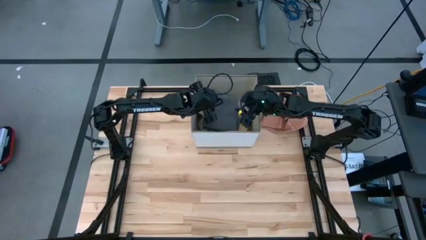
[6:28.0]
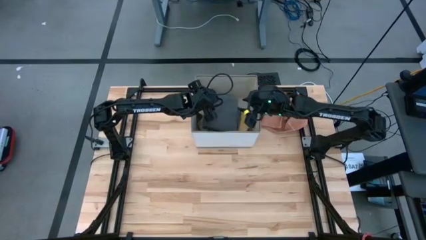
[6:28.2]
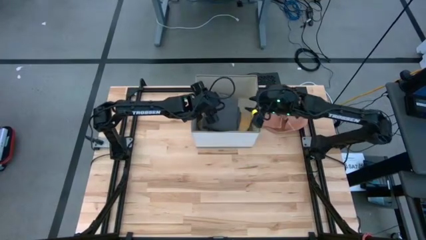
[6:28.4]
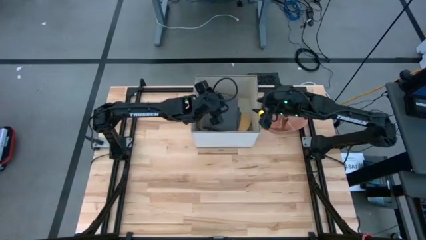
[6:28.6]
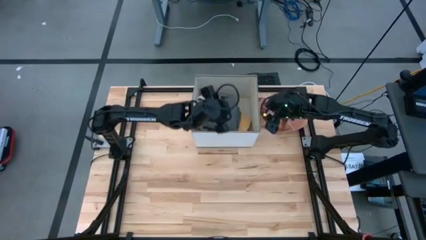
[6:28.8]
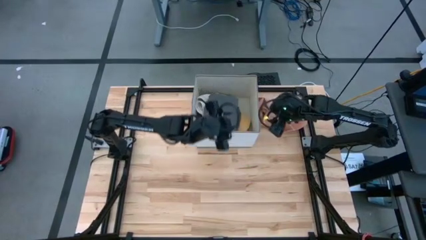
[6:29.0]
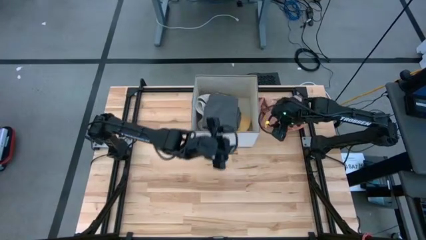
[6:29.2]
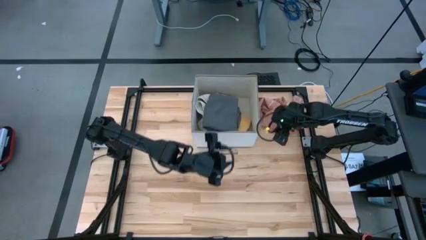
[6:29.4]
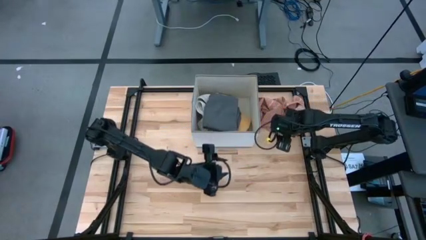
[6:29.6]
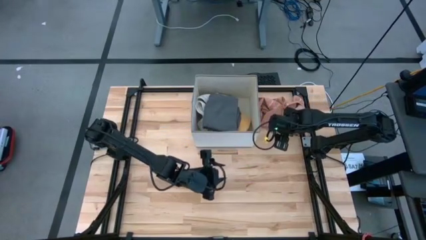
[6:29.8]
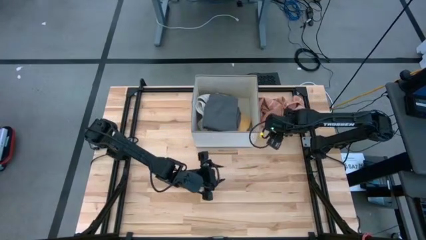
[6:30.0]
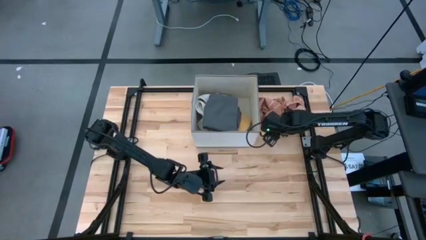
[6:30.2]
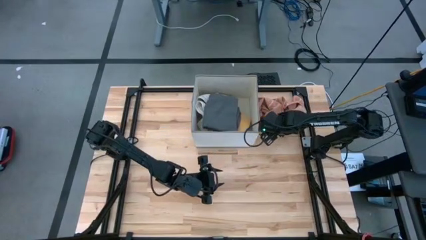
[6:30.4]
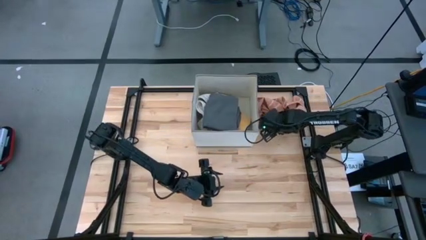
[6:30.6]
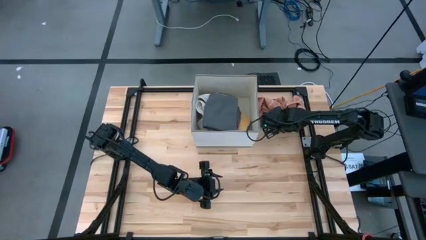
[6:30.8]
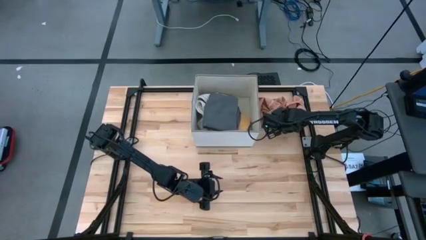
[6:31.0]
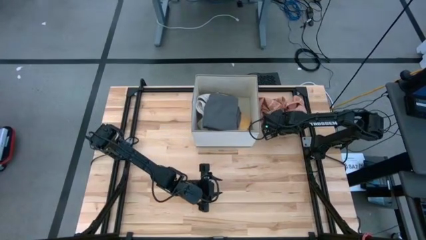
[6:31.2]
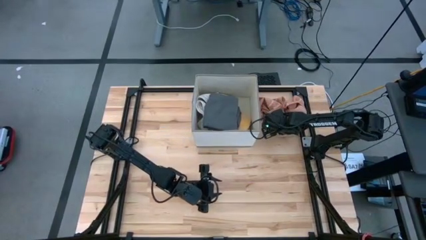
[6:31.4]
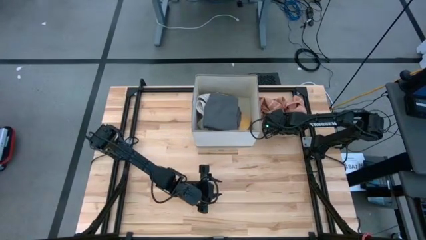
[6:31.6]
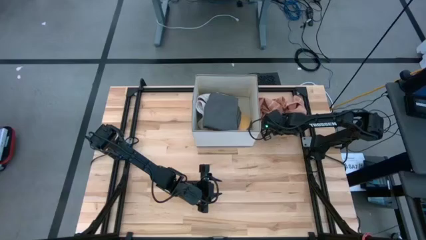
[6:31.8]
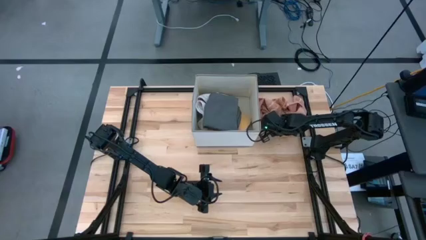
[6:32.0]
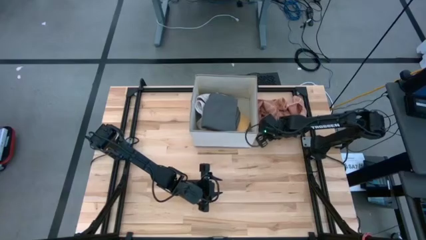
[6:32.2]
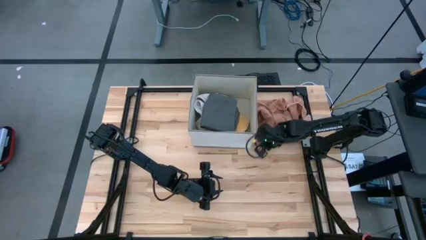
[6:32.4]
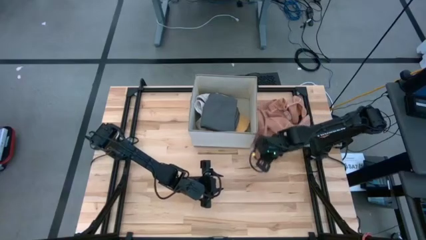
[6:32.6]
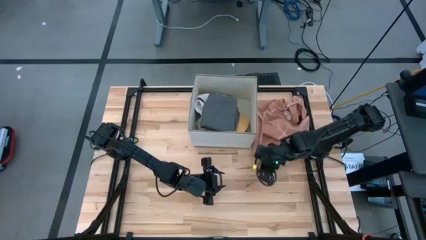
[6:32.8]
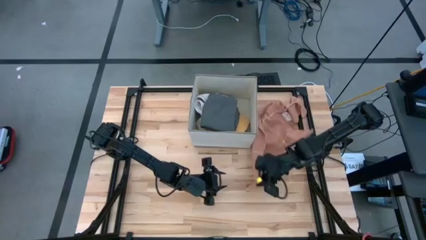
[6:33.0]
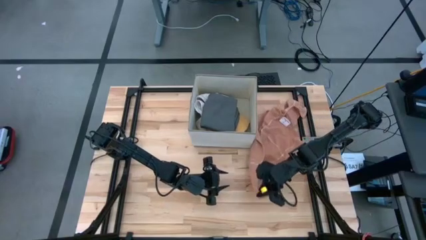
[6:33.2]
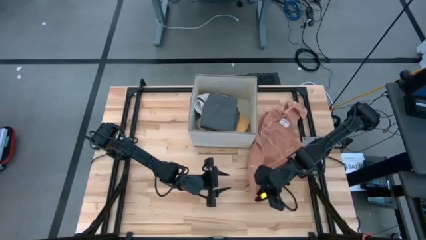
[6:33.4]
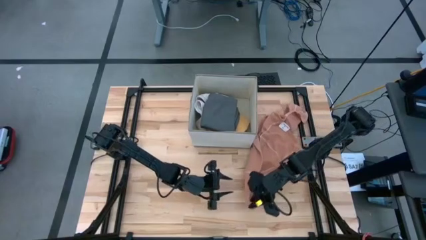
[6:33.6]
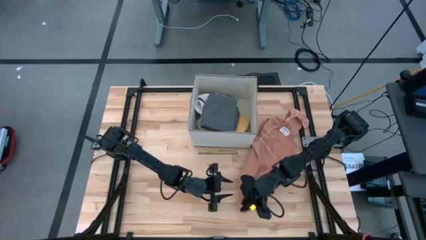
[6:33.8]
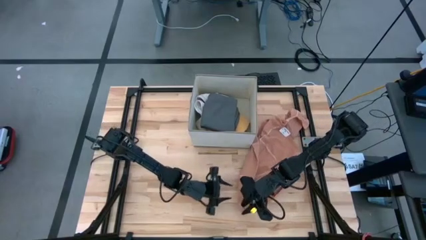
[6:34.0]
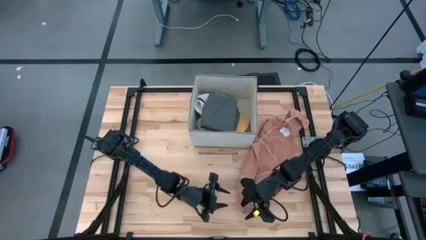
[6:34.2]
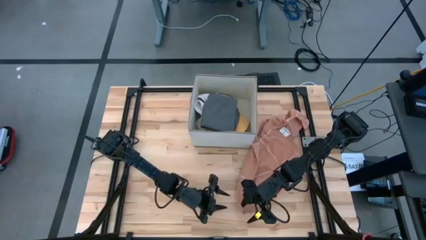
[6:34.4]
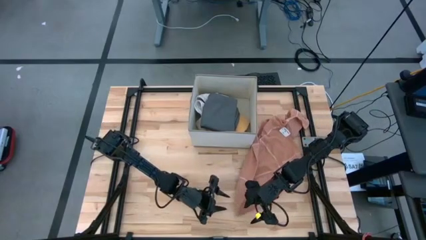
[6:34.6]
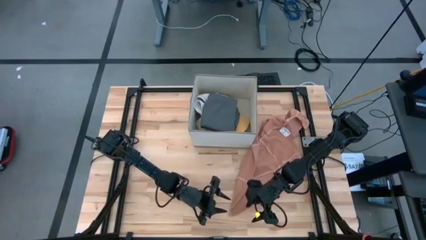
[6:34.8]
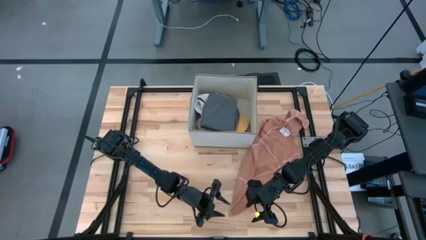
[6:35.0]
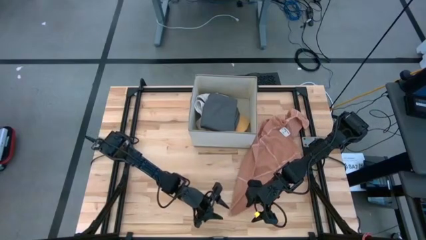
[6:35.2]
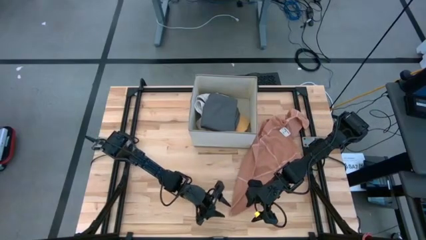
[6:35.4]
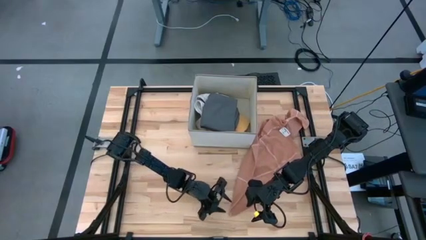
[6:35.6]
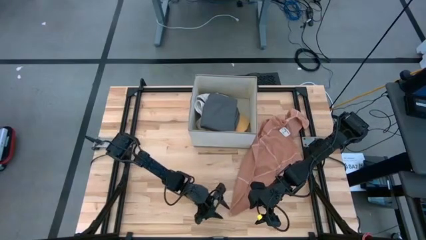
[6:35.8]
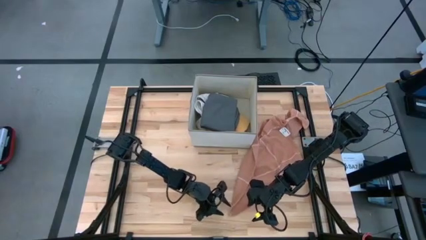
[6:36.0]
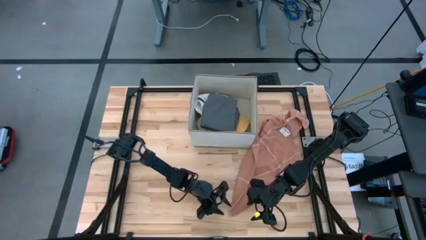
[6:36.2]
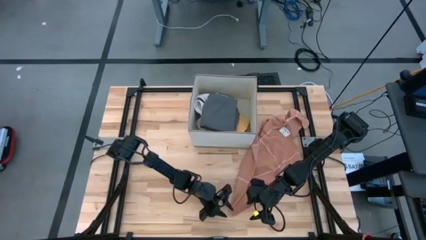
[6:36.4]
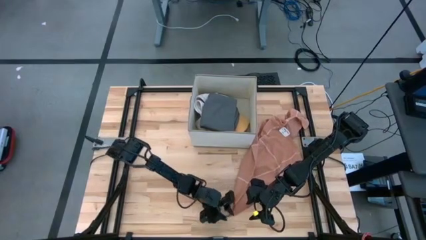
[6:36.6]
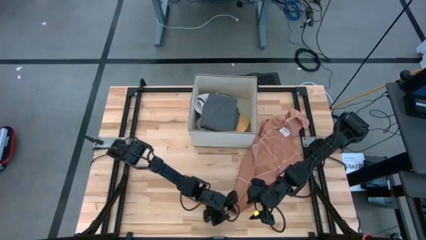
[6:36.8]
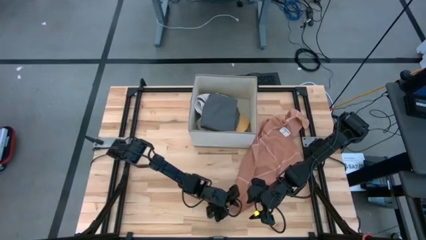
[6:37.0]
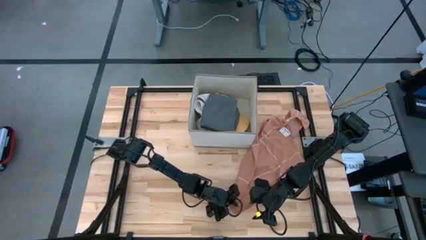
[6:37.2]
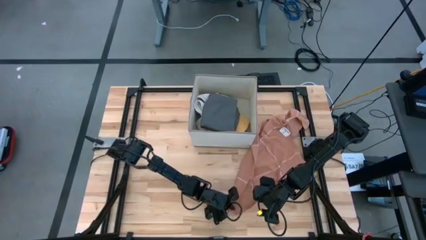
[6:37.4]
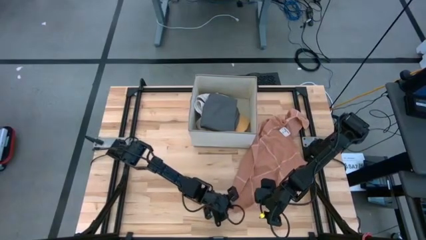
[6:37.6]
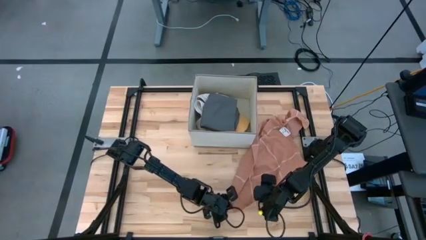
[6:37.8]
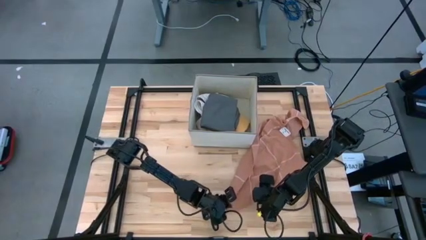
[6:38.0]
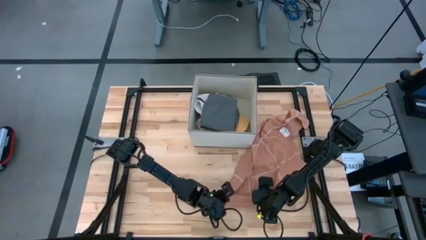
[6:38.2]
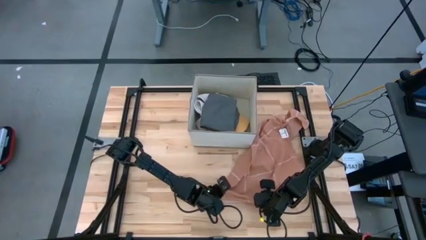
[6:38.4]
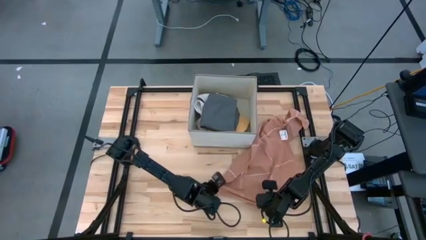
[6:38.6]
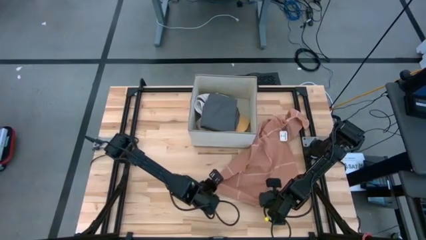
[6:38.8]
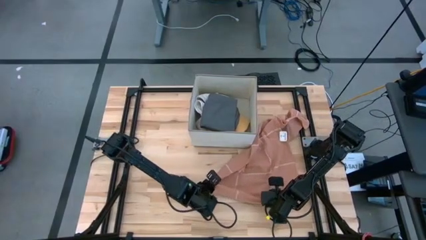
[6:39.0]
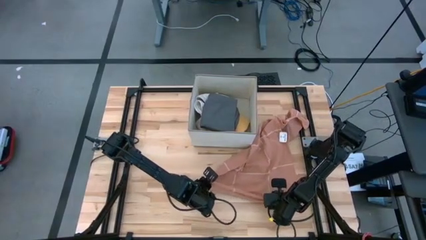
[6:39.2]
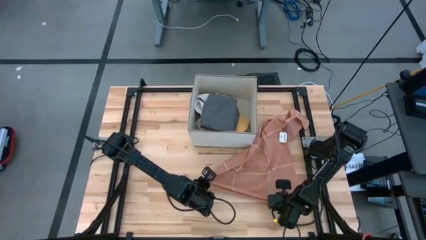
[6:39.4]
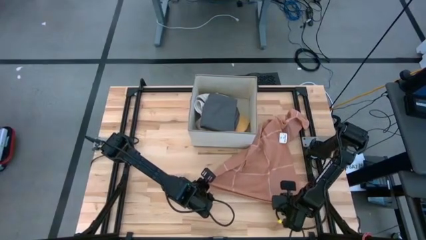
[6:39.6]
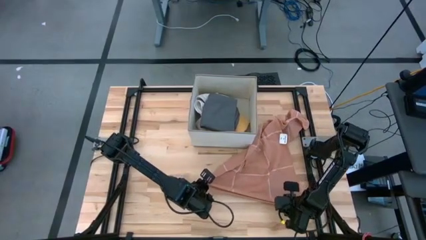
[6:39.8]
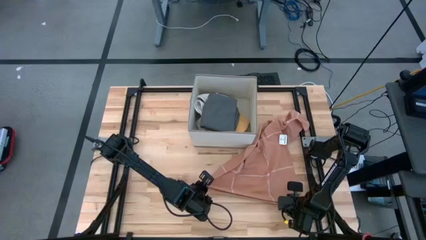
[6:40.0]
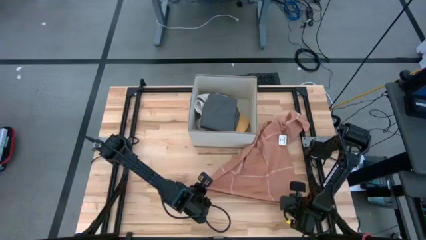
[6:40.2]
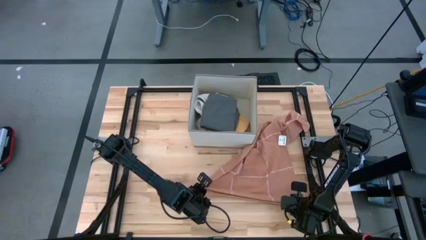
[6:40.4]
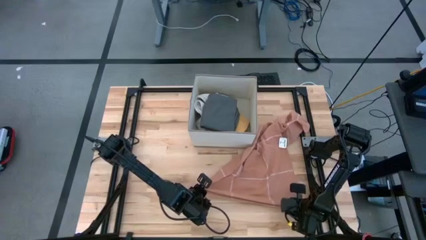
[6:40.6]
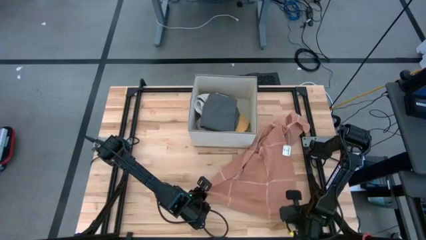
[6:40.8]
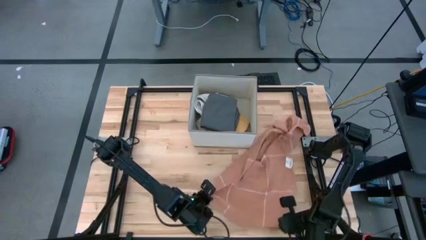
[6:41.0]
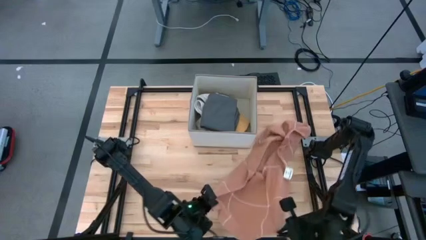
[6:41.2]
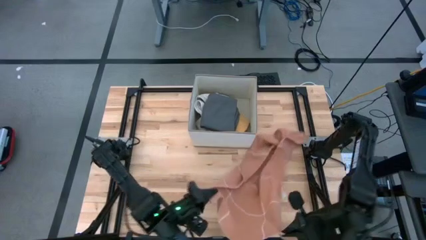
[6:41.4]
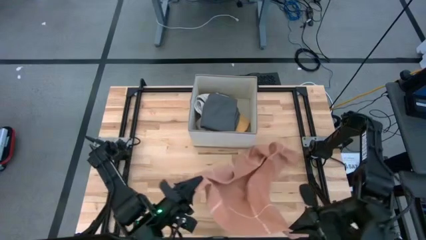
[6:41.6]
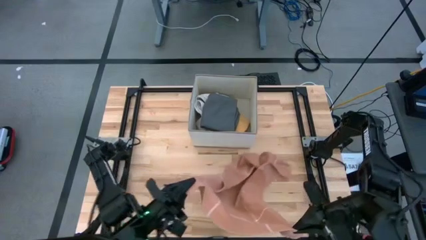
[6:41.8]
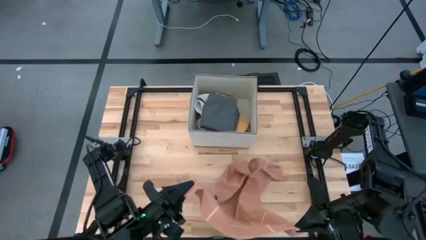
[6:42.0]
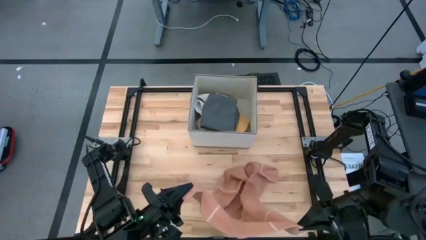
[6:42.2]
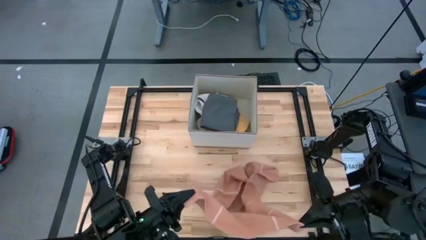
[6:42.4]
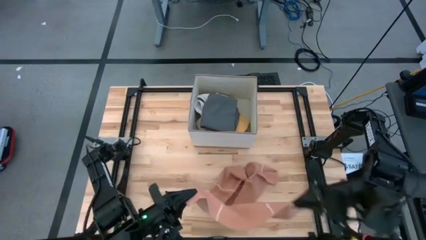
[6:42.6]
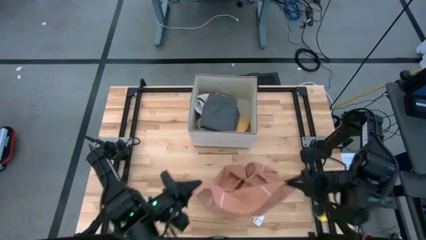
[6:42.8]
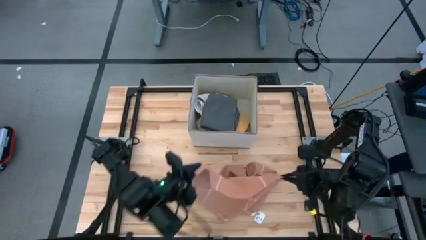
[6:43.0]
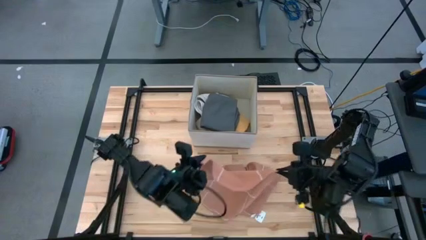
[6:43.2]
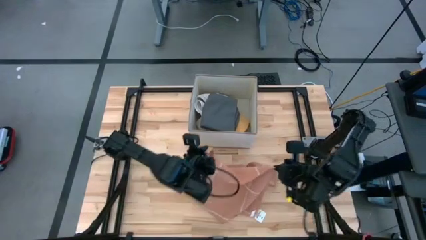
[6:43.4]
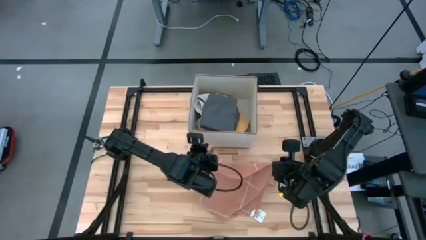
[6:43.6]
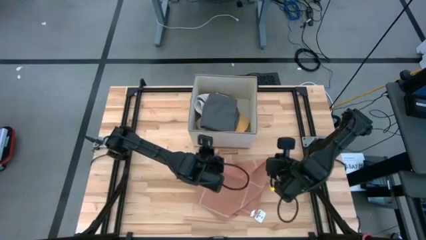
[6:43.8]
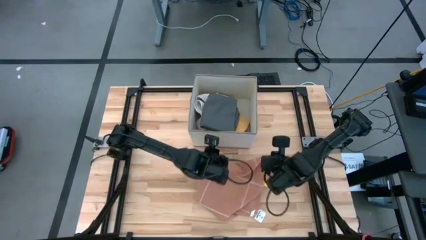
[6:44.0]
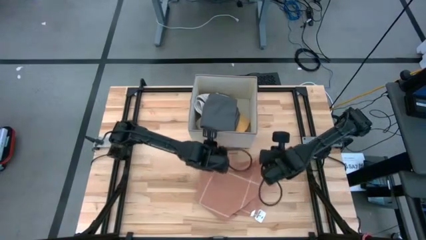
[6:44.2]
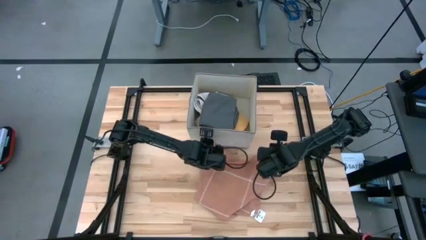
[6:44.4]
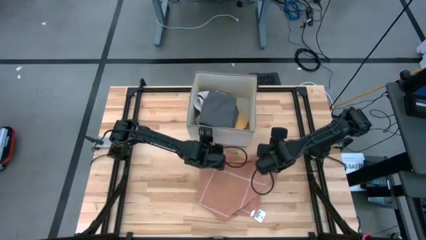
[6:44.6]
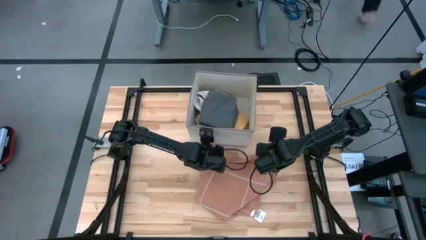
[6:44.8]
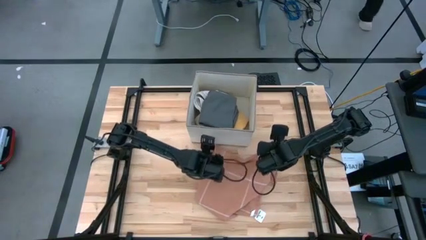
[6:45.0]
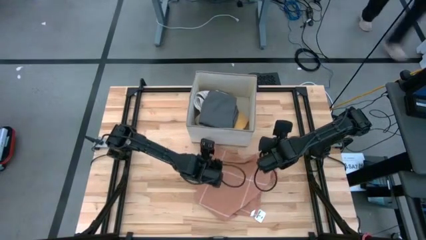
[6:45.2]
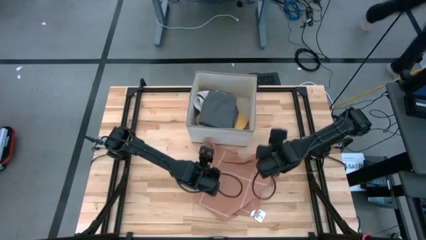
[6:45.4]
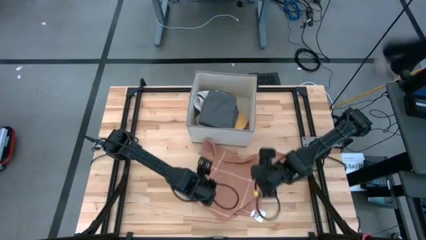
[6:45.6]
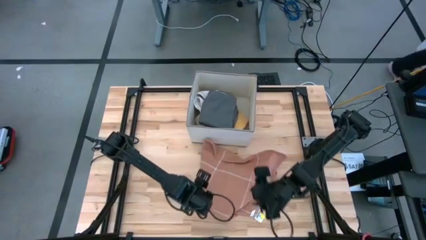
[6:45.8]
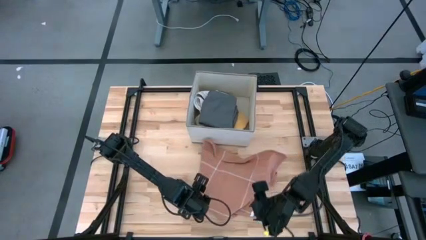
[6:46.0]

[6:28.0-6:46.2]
Task: Fold towel
Fold the brown towel with white checkered lines
